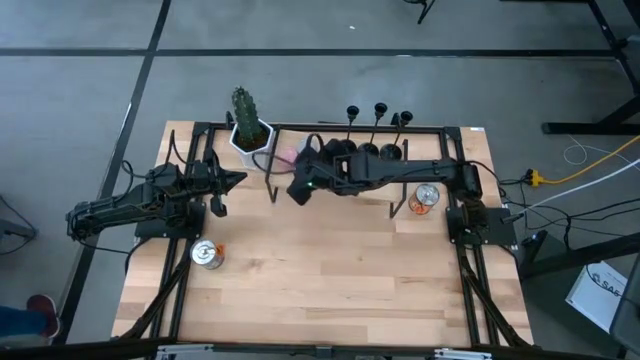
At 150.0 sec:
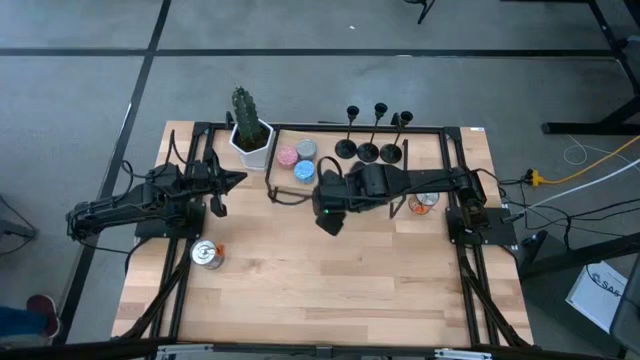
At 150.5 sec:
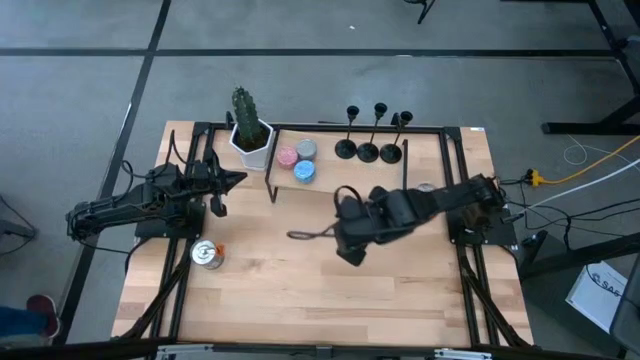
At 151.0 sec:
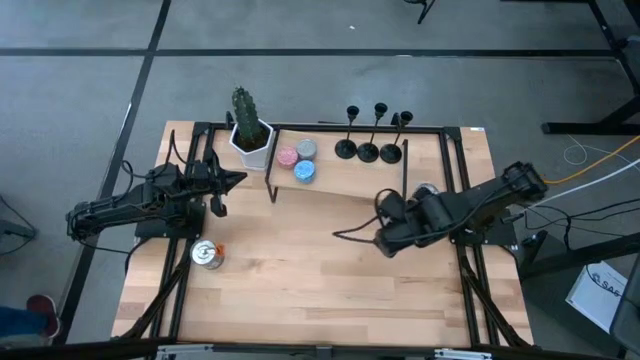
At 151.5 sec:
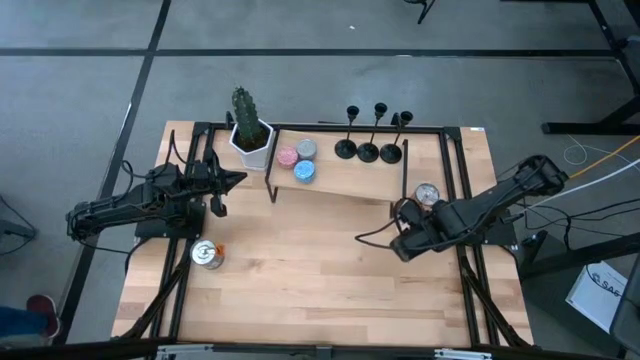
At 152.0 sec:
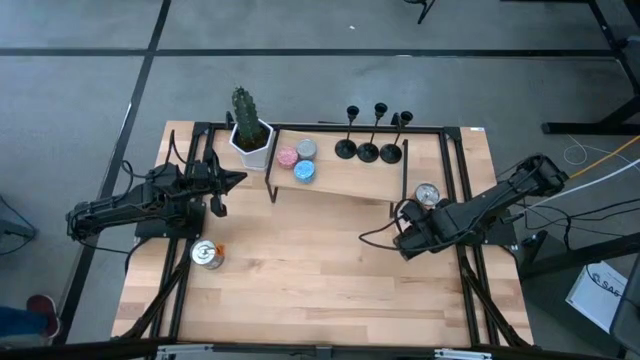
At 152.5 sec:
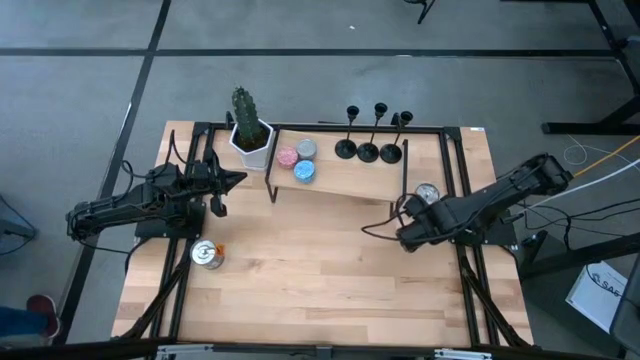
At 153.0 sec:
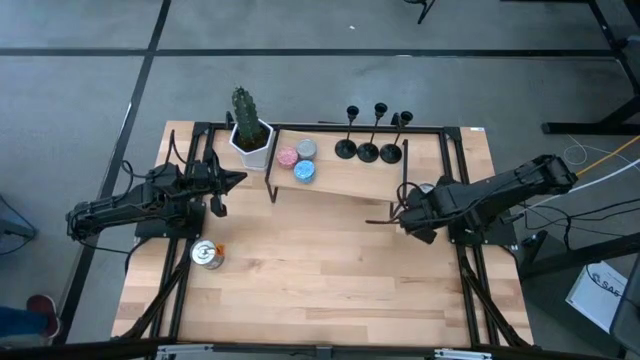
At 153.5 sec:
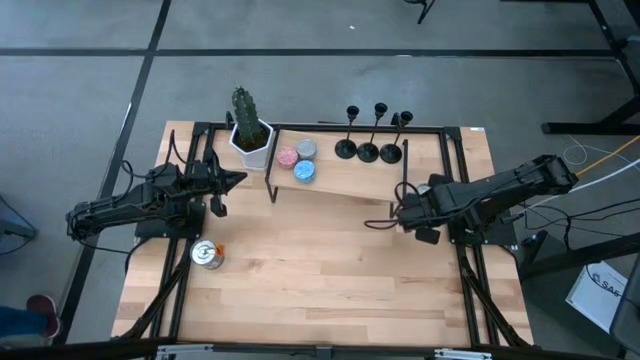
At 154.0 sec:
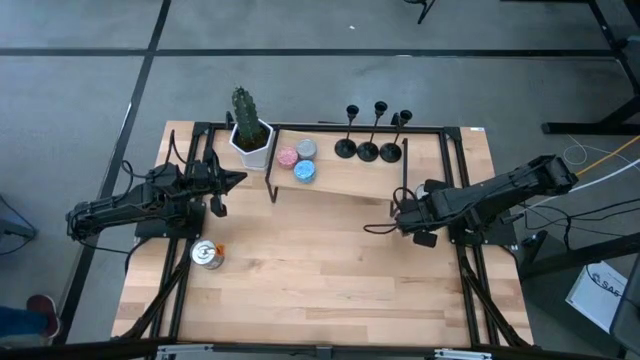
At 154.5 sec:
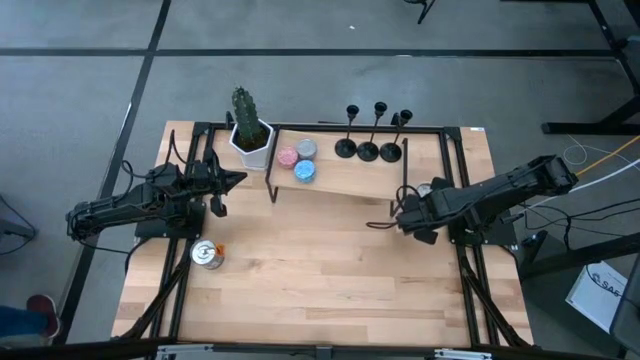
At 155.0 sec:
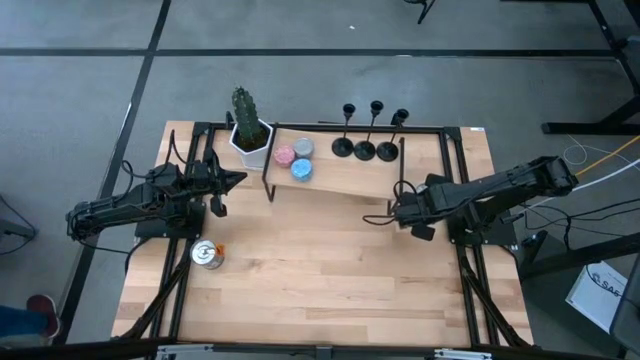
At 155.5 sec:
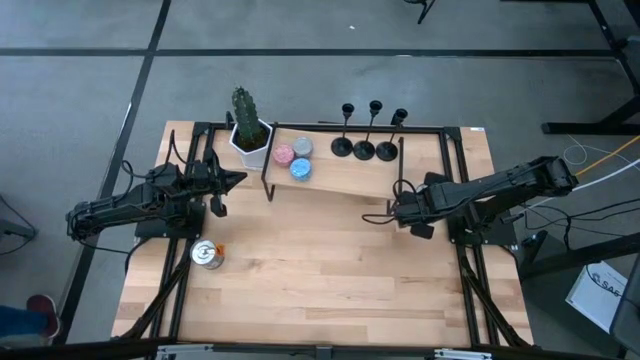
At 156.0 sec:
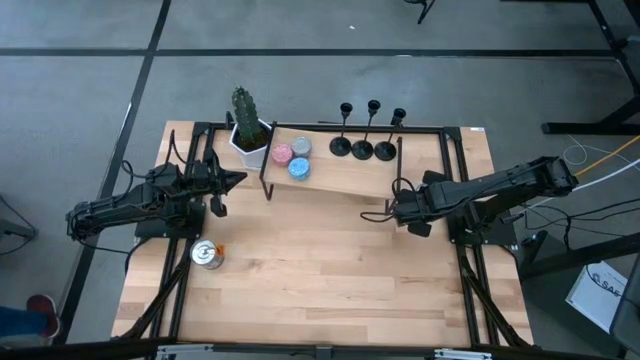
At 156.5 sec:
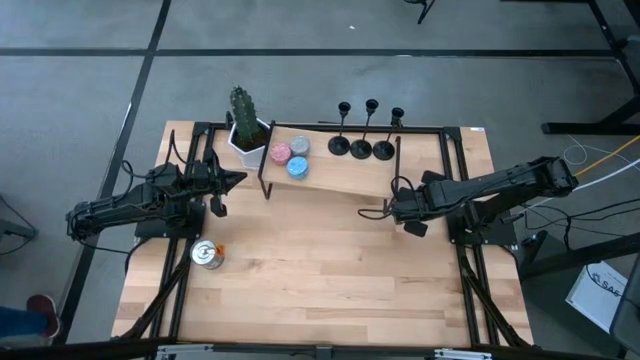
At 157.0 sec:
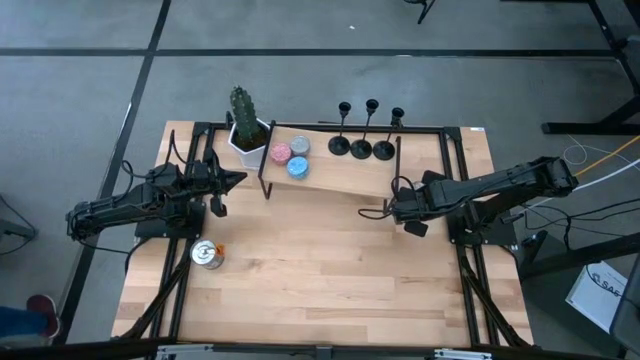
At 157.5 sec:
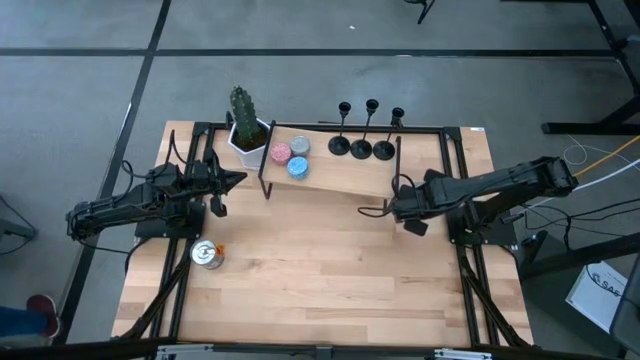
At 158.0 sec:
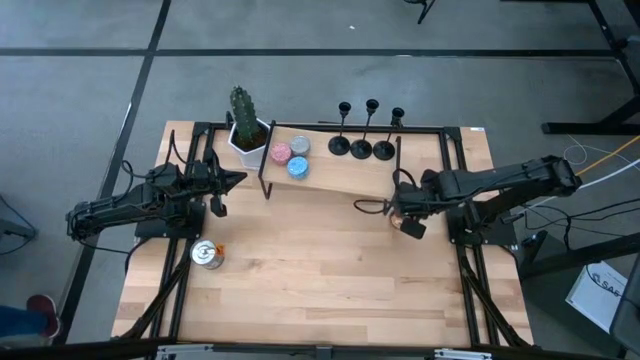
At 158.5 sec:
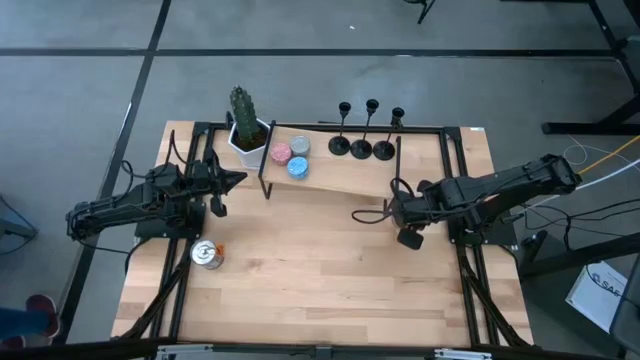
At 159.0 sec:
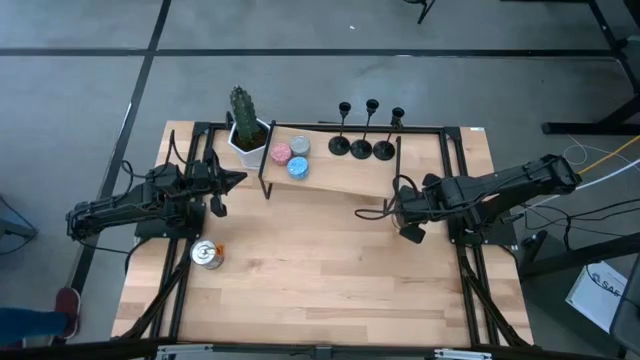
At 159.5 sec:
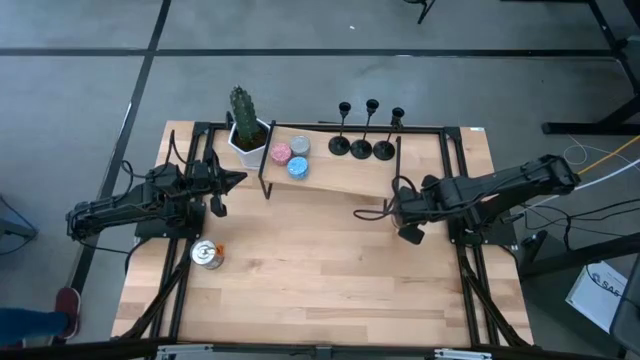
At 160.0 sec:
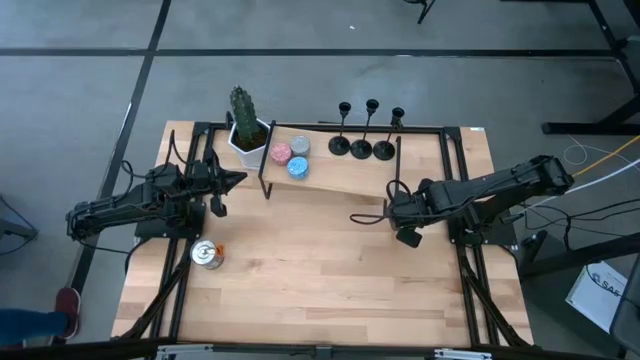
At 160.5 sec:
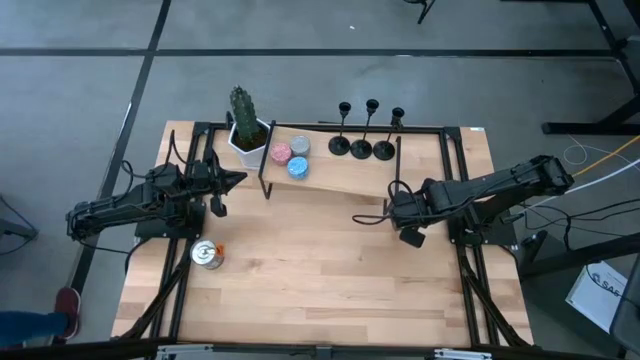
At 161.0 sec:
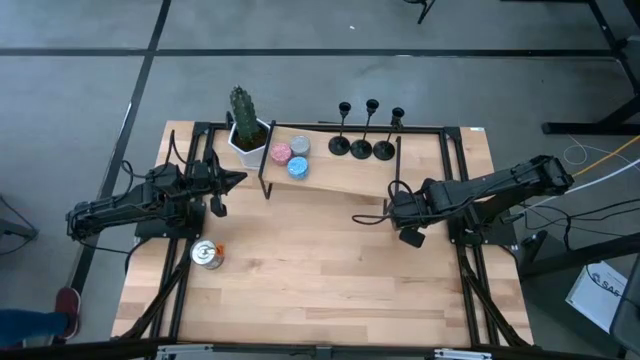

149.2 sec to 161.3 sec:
Task: Pick & Place candle stick holders
Put the top silver scented candle on the shelf

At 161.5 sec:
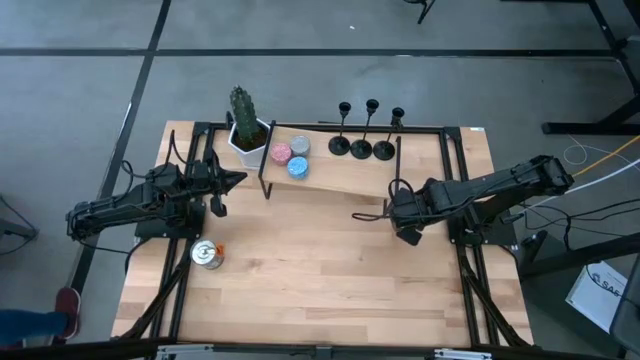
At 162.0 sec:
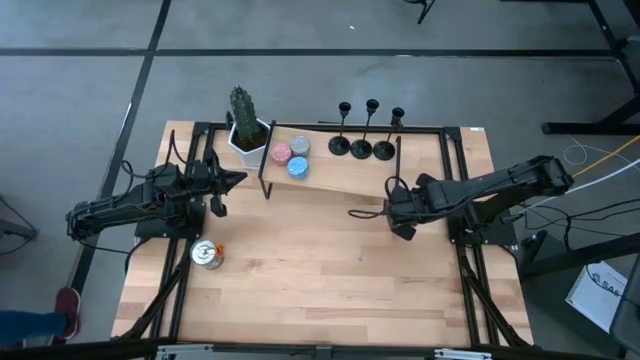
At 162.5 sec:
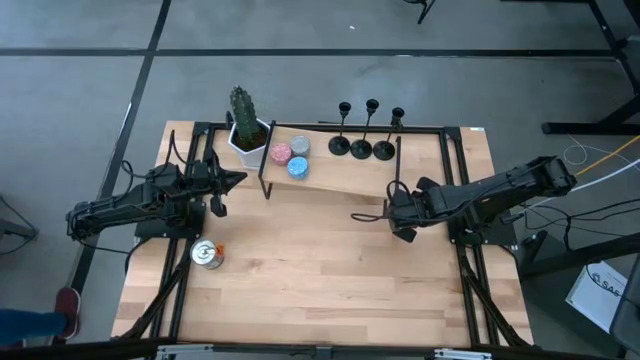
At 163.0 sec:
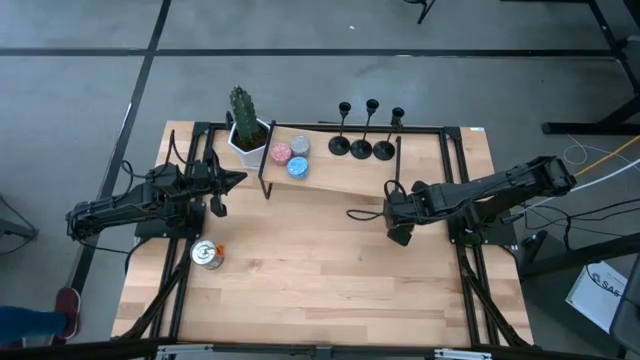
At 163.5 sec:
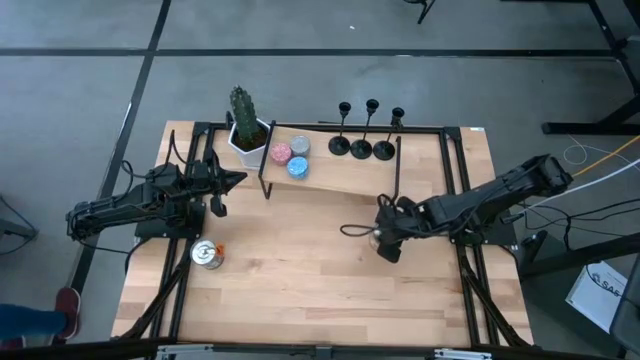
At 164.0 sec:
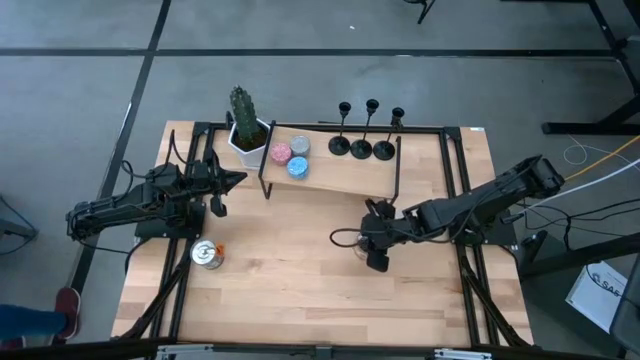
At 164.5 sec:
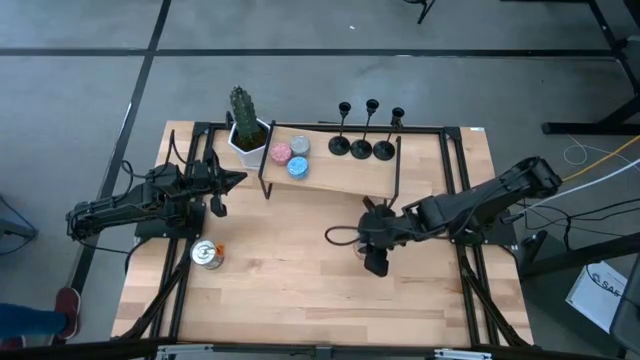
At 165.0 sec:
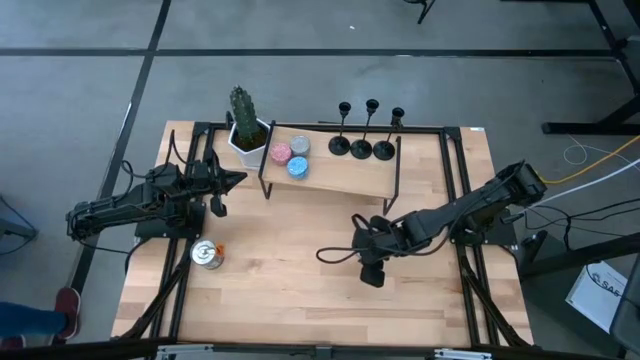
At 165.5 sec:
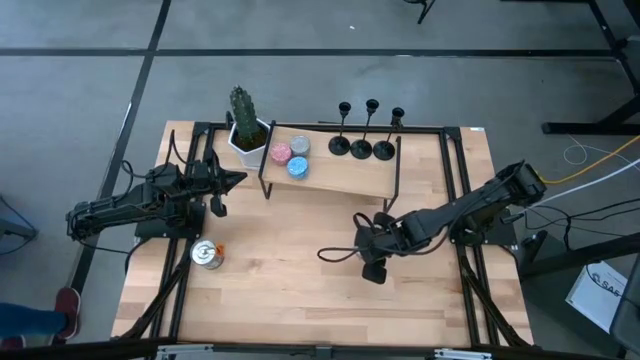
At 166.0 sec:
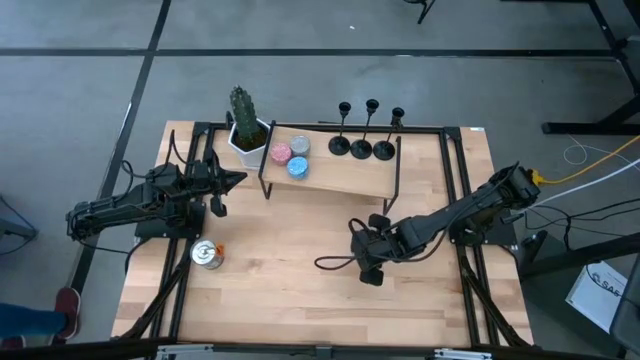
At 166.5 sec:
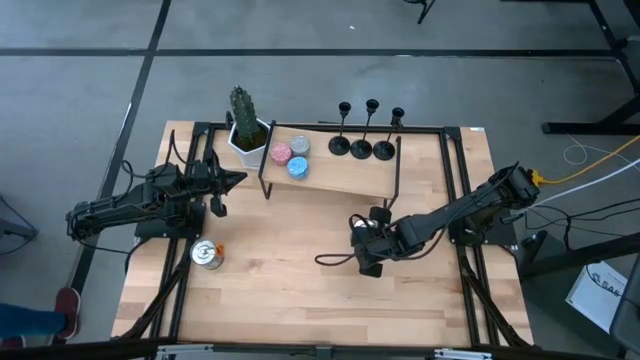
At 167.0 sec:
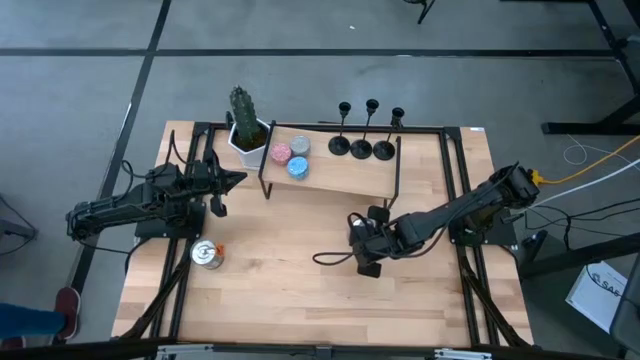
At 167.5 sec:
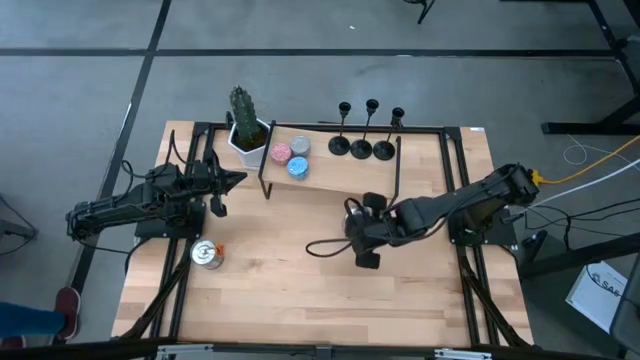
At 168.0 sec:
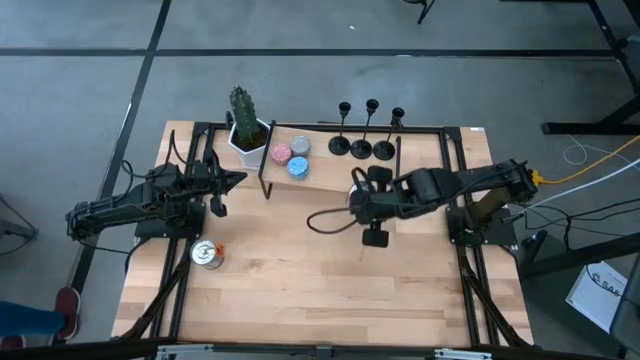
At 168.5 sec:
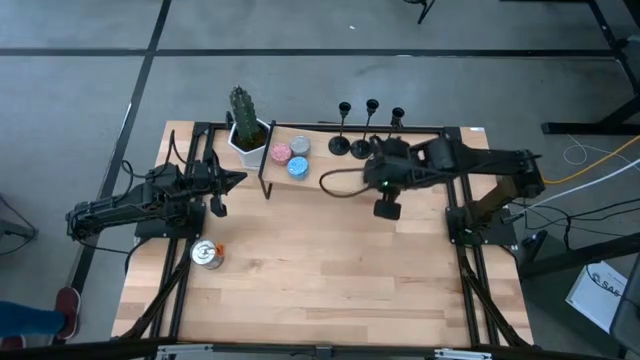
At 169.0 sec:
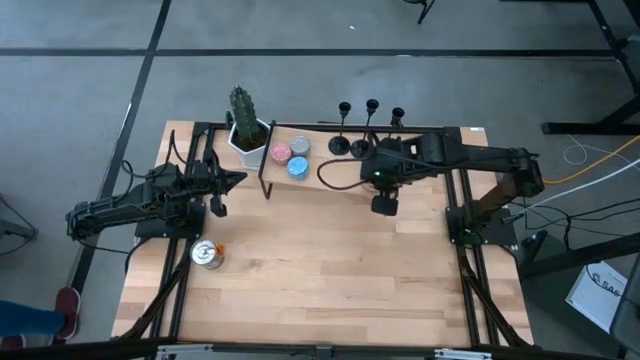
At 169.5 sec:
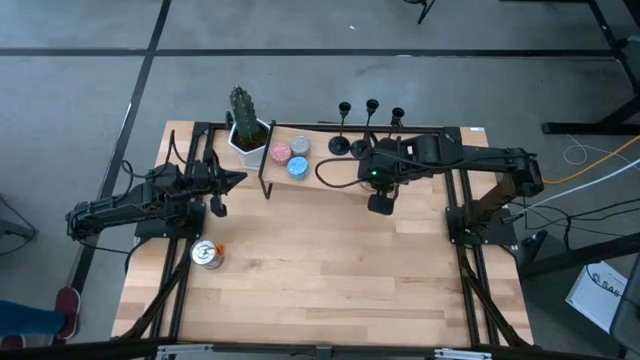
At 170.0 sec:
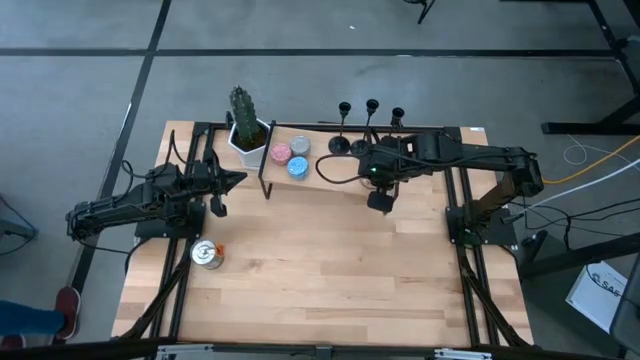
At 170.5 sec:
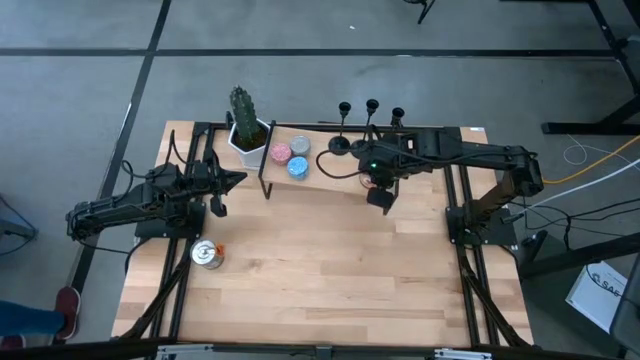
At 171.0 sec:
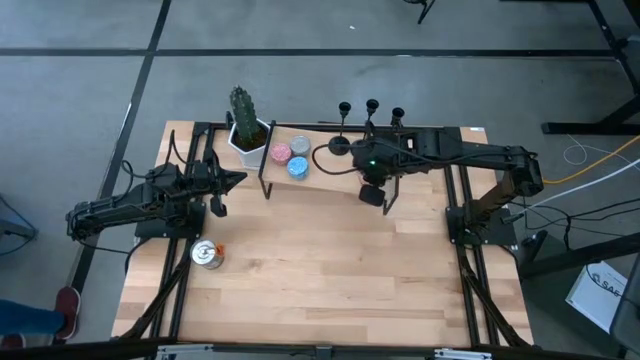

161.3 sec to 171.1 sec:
Put the top silver scented candle on the shelf
